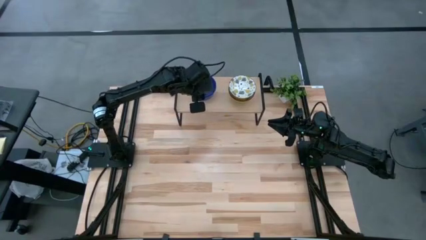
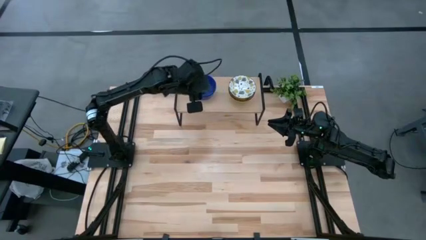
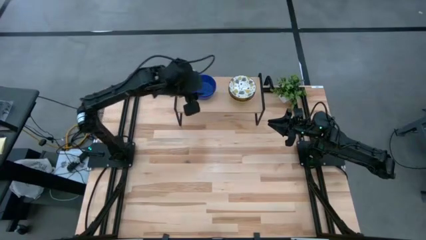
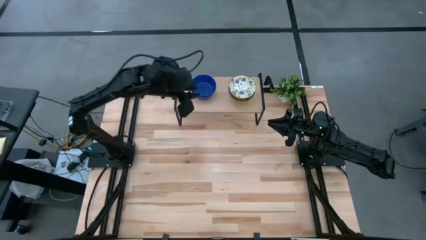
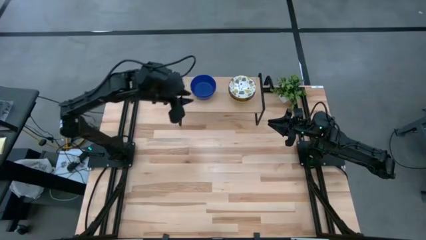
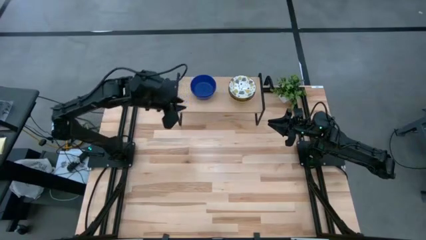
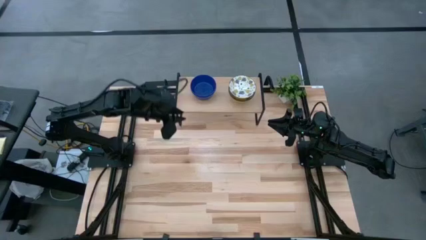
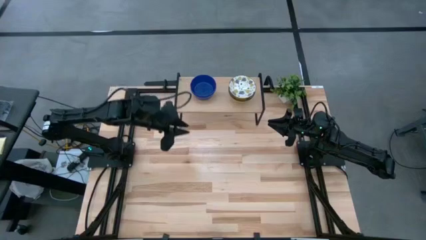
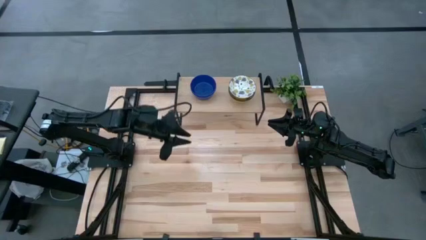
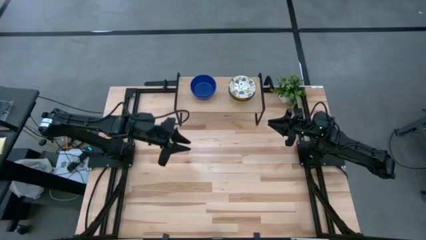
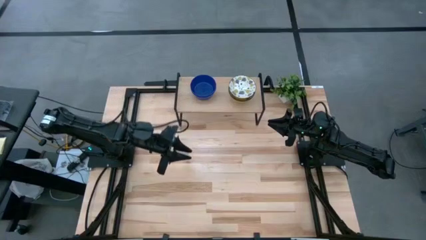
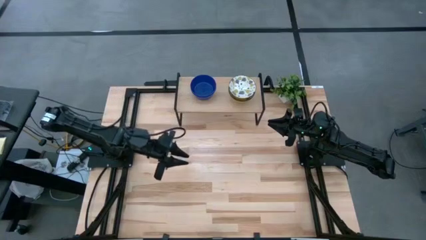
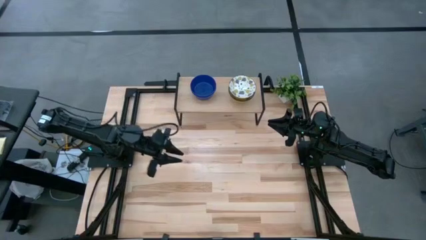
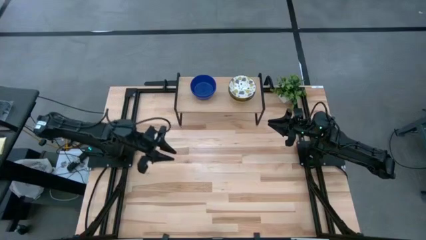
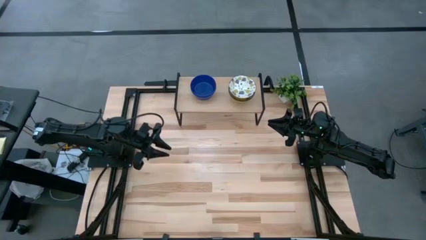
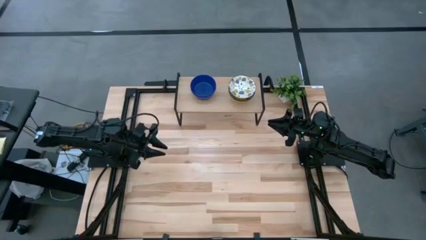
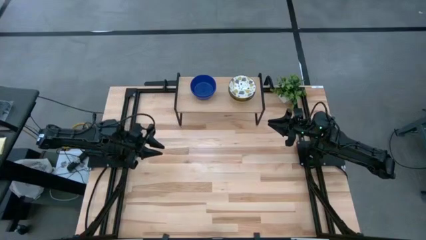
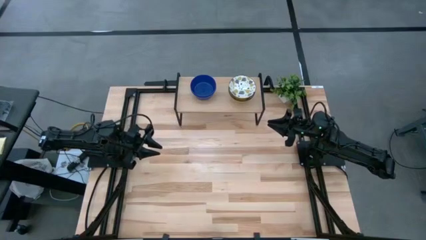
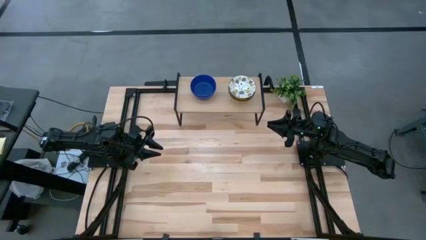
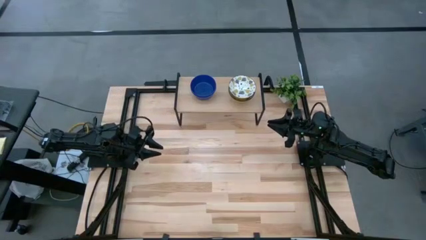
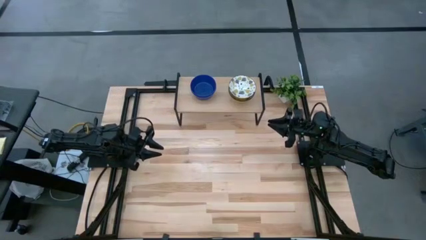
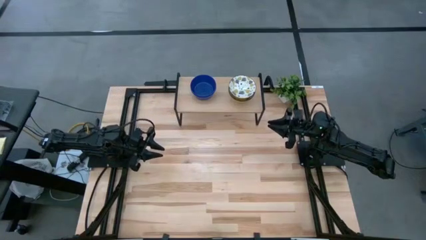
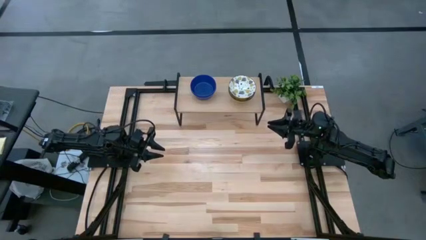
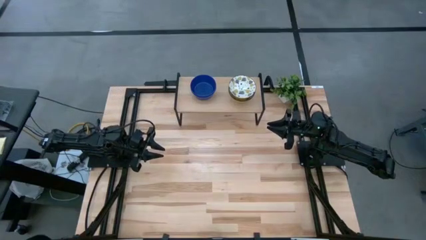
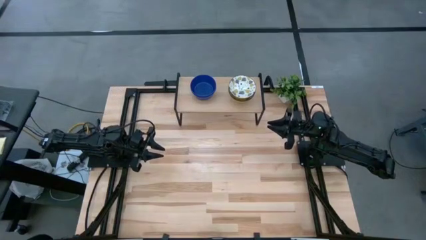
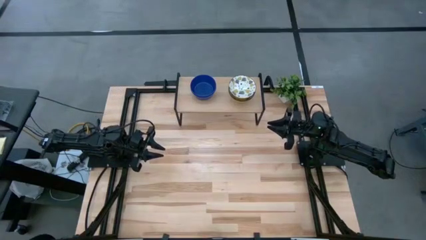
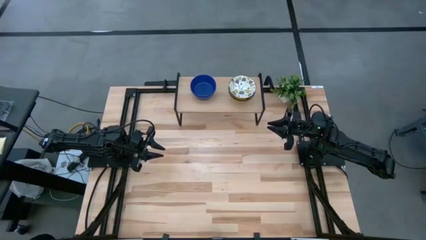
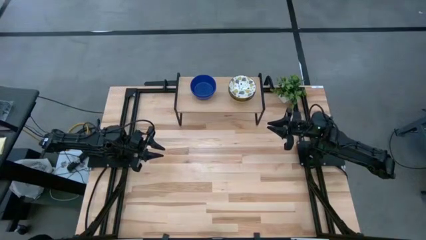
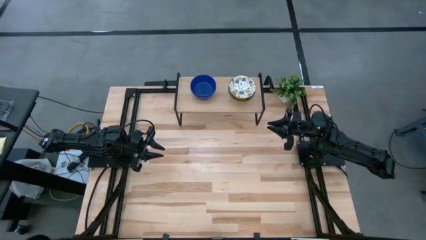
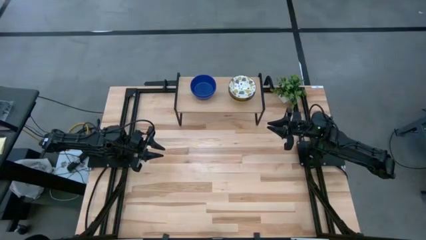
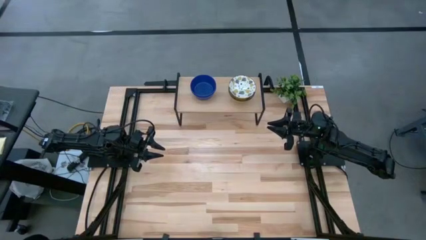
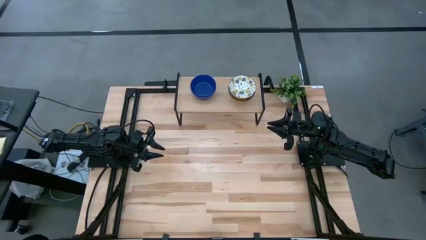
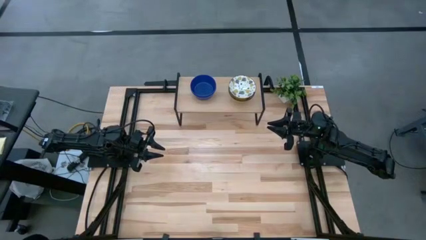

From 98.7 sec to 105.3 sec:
Task: Pick & Place Mini bowls
Return to Home Position

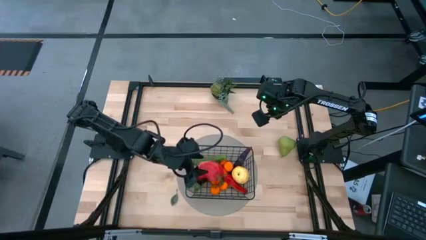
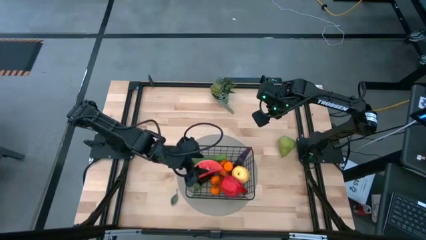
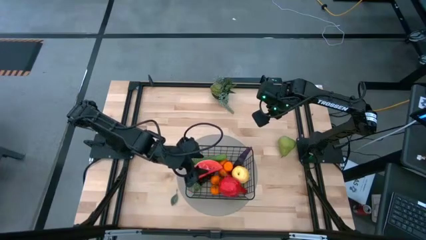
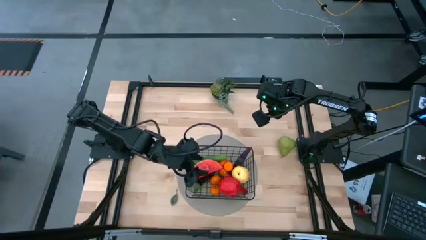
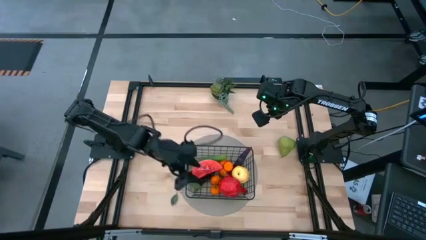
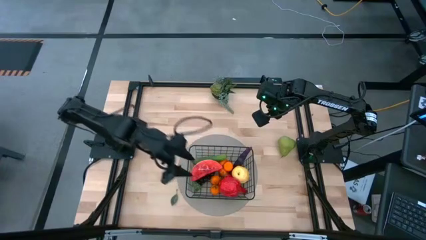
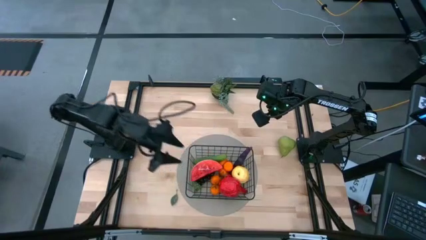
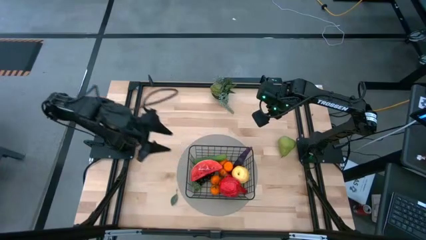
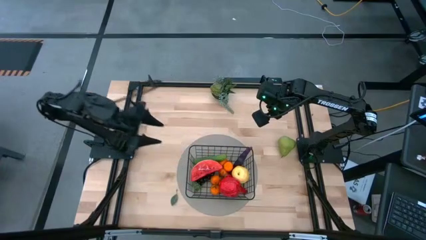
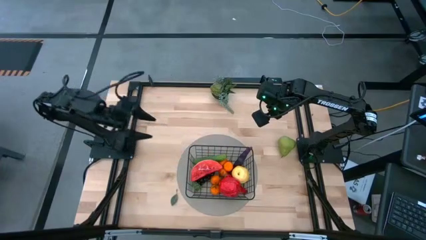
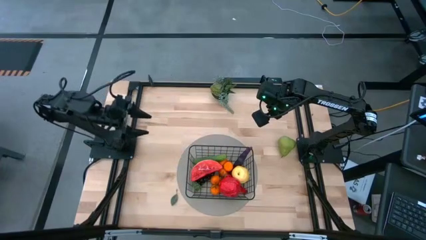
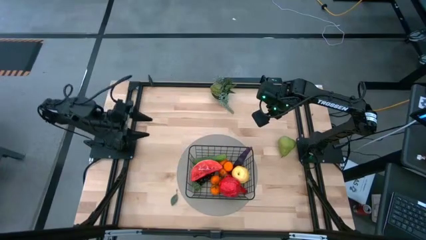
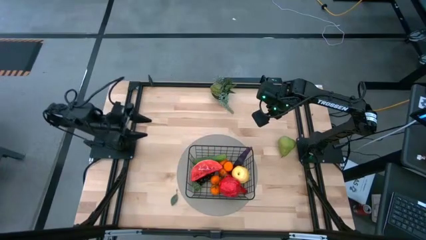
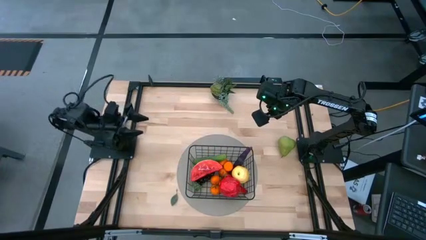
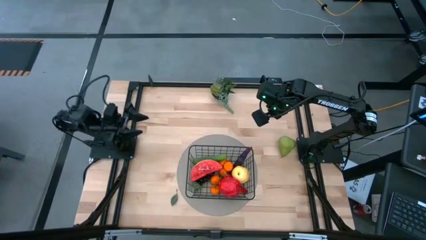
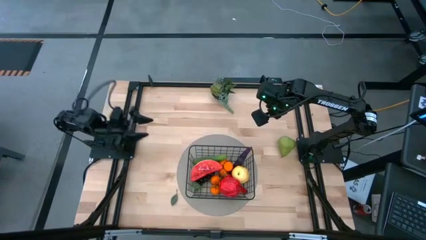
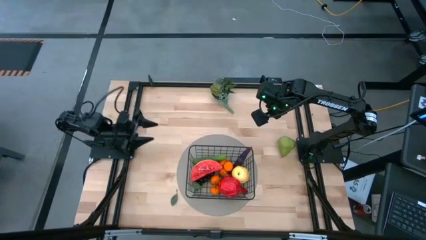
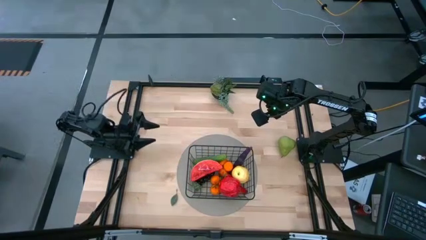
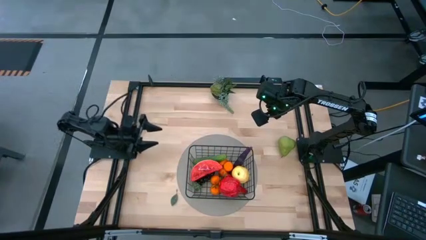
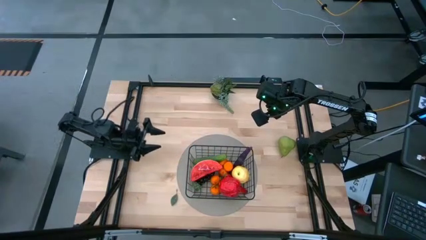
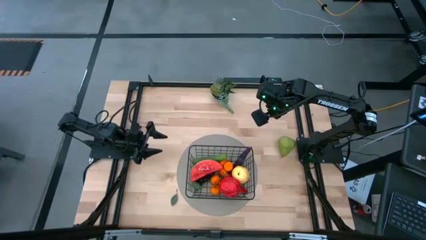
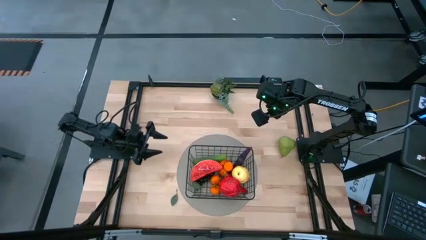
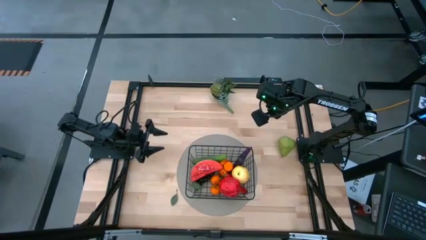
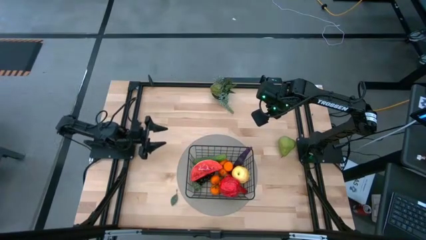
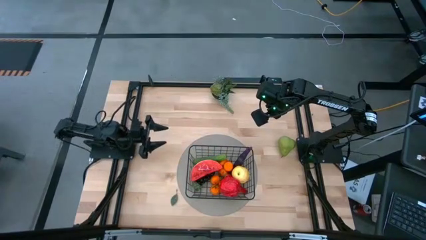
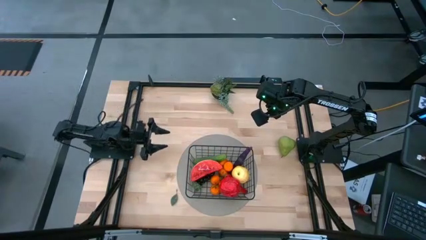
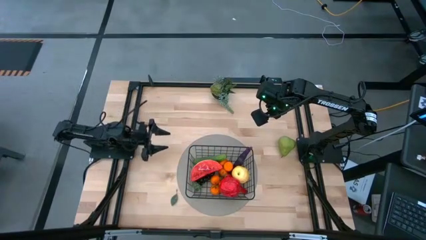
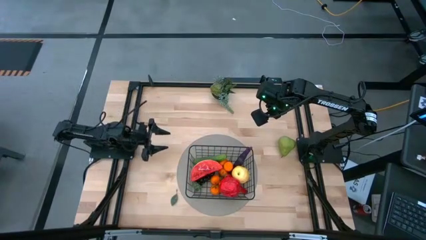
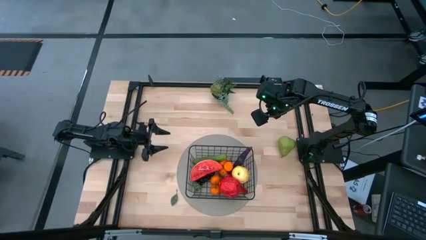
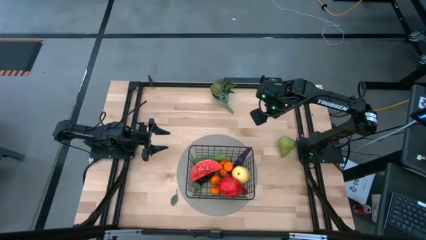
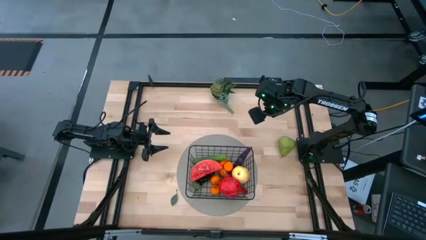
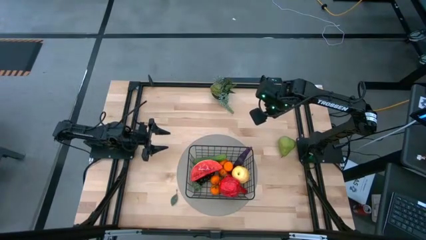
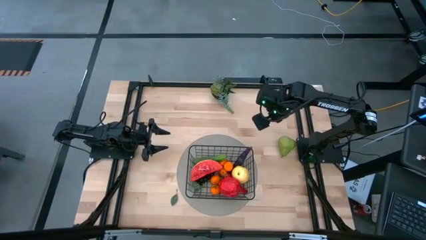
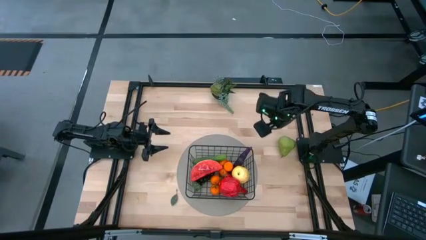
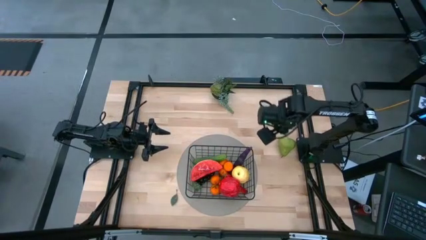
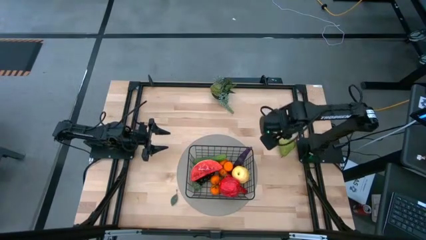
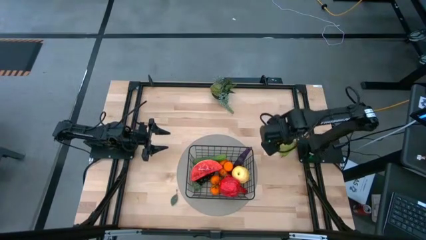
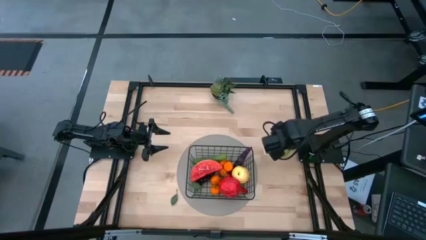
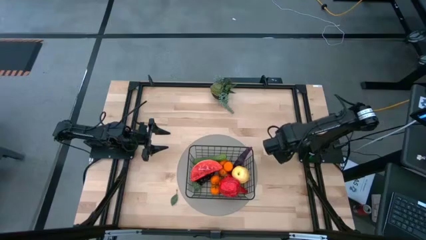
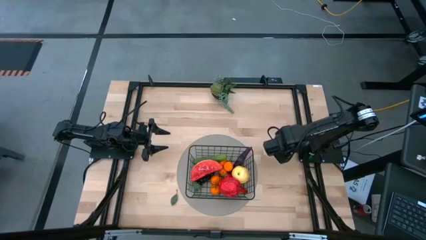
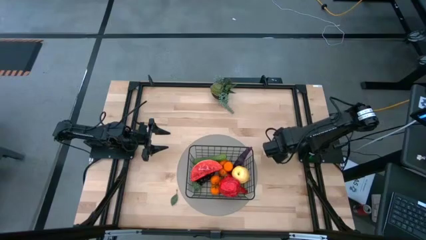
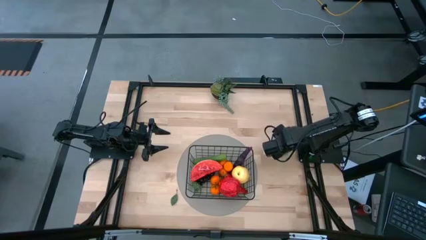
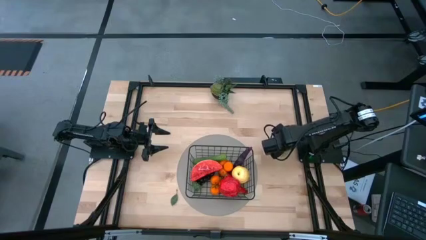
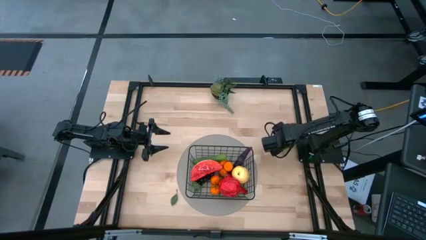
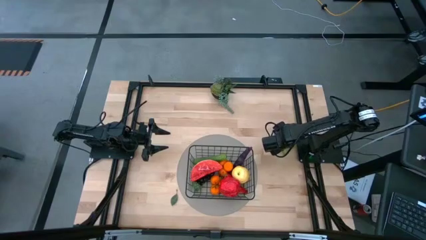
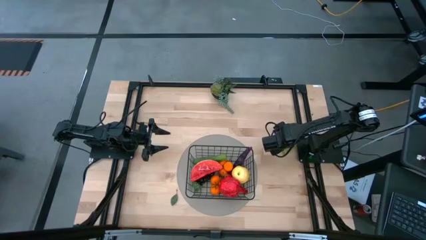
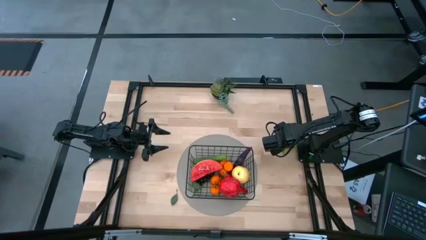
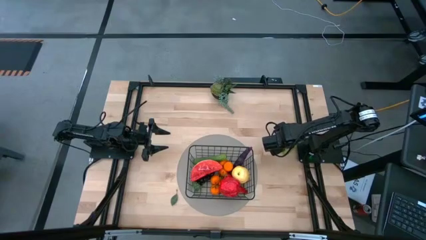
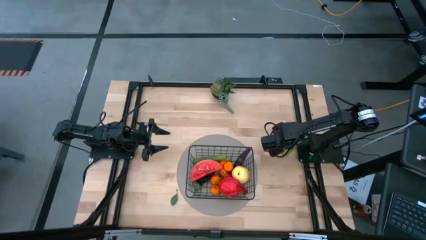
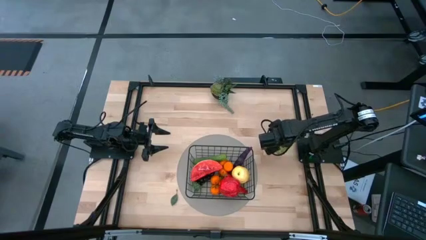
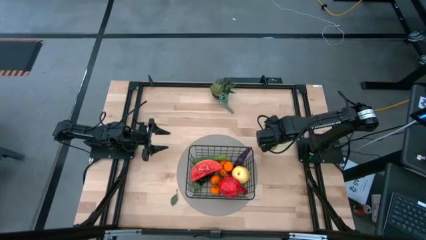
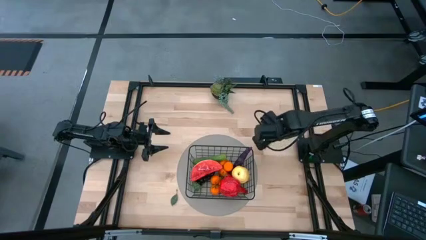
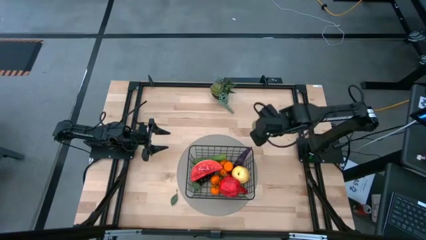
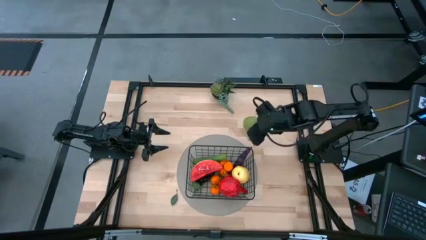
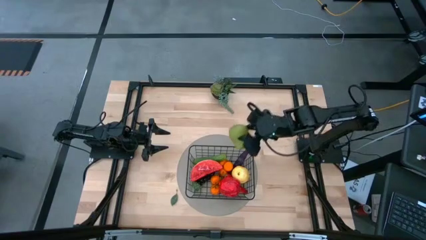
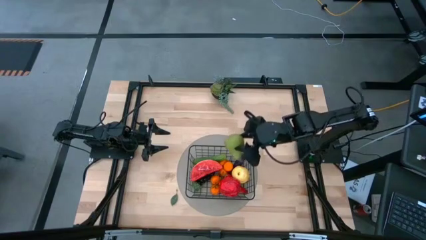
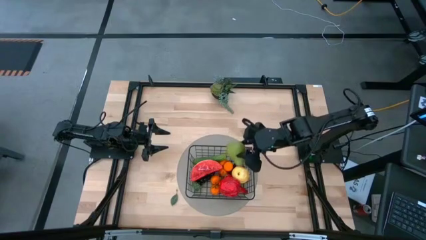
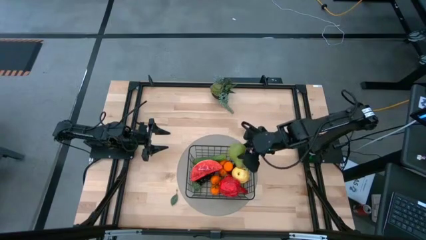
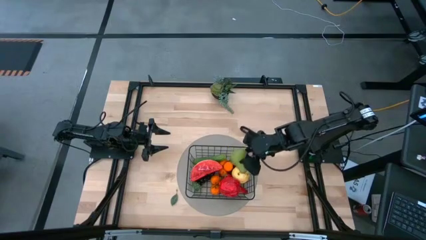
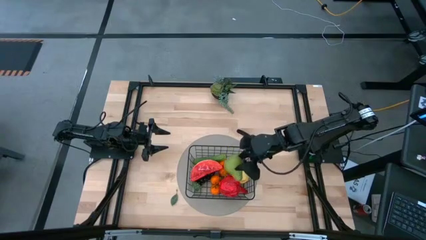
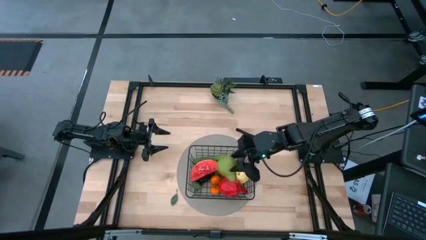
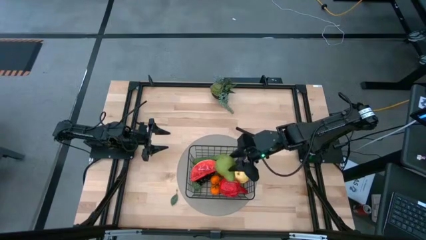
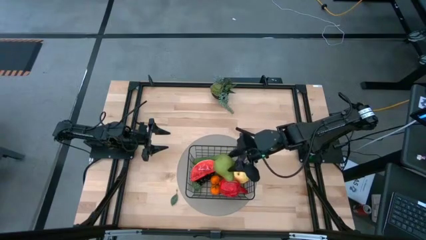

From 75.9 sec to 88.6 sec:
Task: Build produce basket
Put the green pear into the black wire basket
